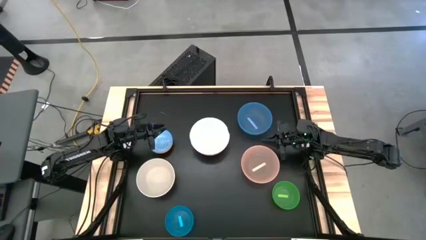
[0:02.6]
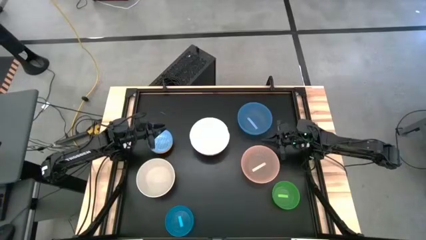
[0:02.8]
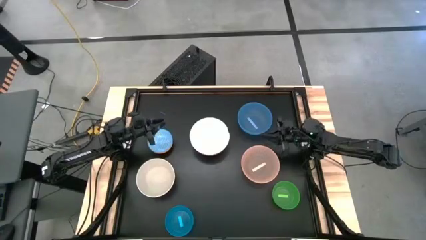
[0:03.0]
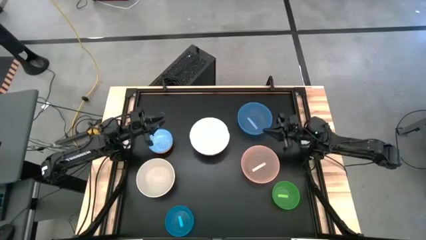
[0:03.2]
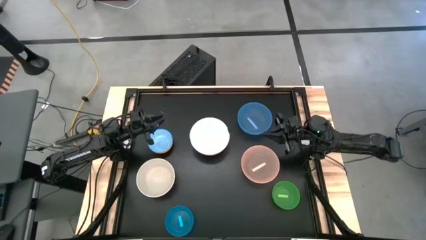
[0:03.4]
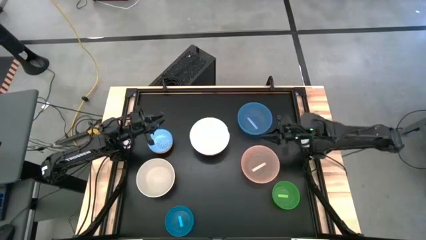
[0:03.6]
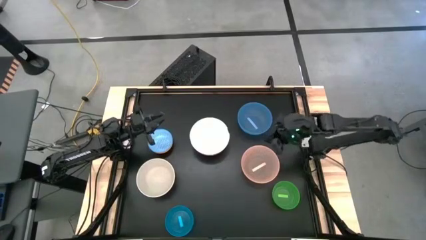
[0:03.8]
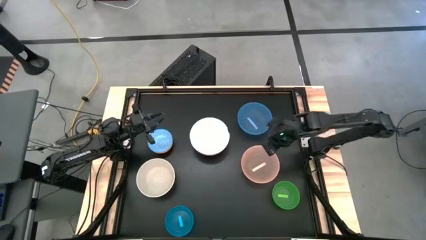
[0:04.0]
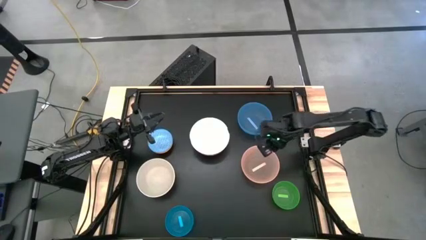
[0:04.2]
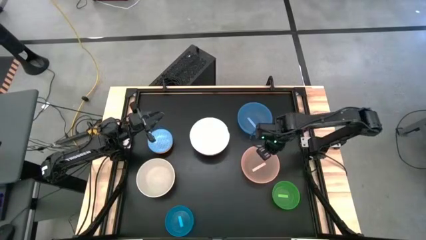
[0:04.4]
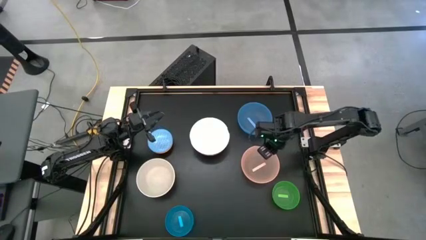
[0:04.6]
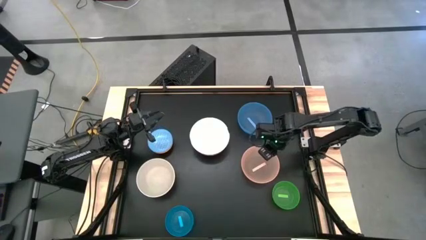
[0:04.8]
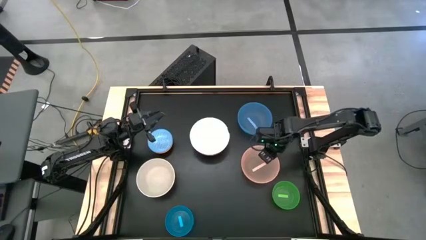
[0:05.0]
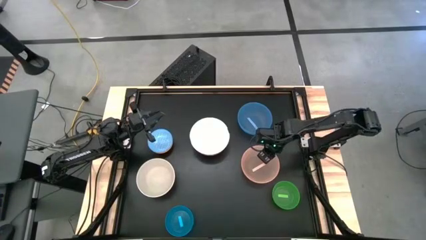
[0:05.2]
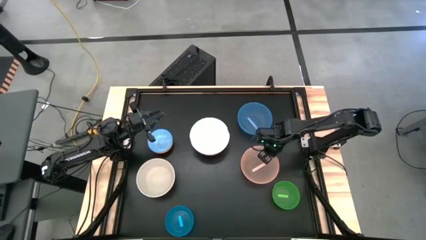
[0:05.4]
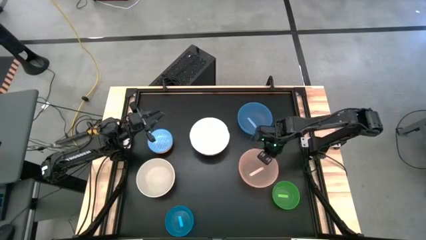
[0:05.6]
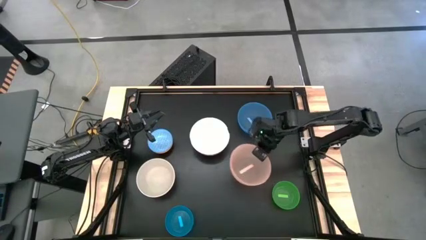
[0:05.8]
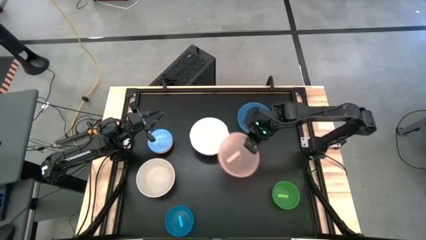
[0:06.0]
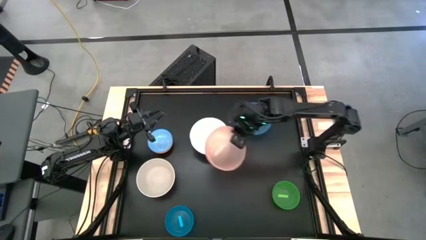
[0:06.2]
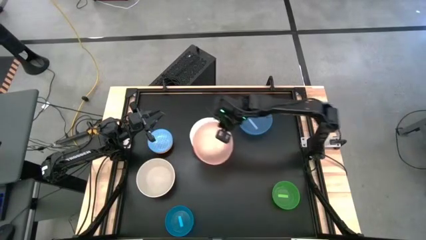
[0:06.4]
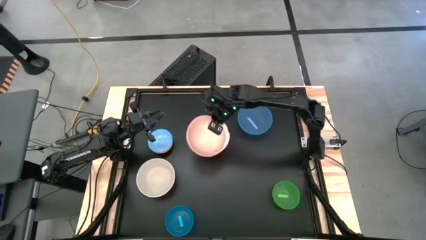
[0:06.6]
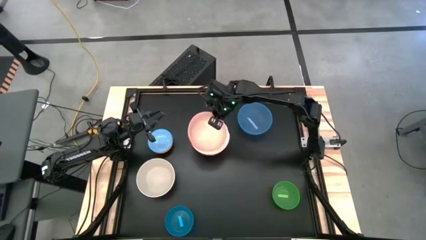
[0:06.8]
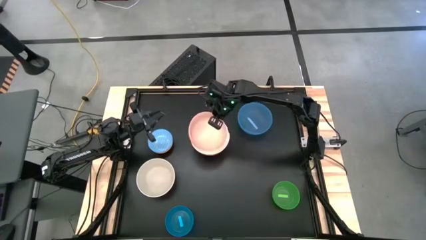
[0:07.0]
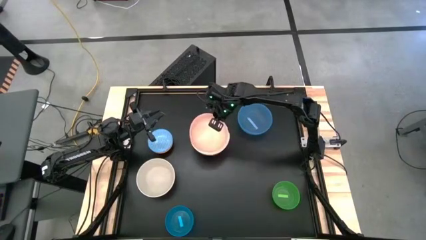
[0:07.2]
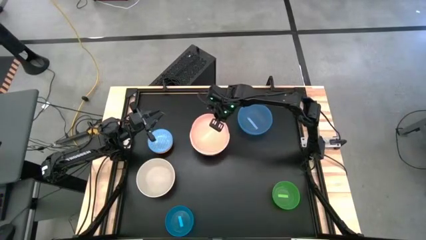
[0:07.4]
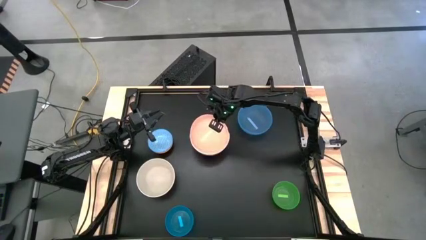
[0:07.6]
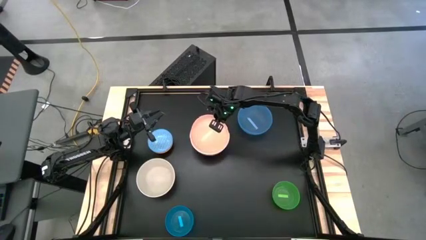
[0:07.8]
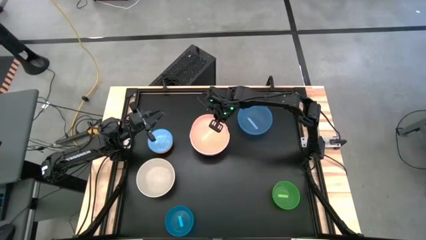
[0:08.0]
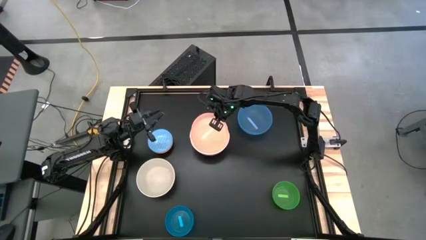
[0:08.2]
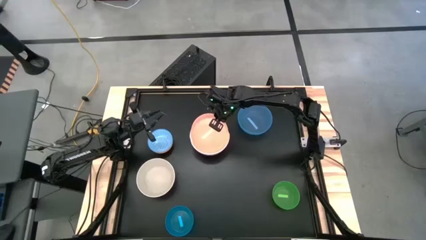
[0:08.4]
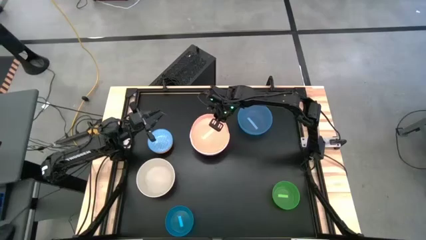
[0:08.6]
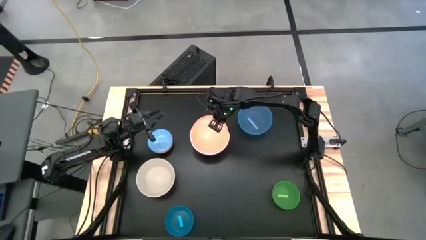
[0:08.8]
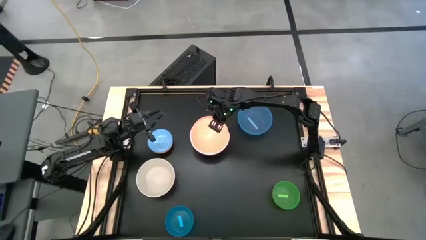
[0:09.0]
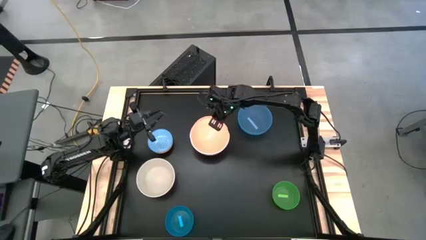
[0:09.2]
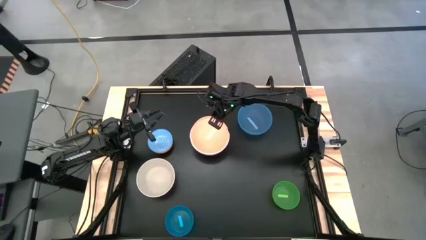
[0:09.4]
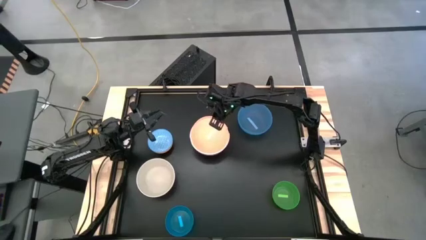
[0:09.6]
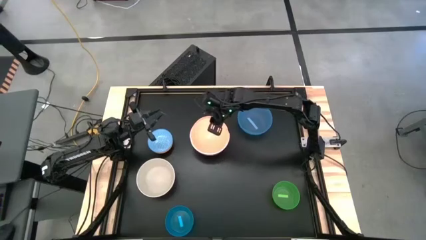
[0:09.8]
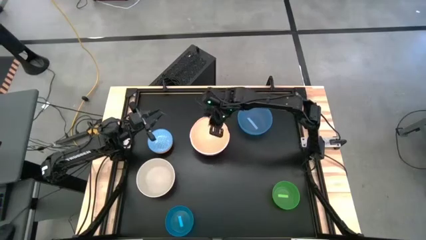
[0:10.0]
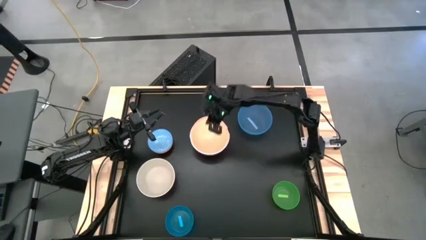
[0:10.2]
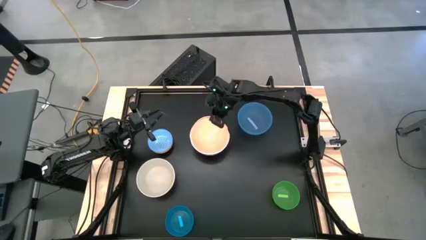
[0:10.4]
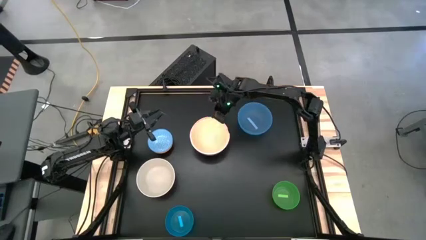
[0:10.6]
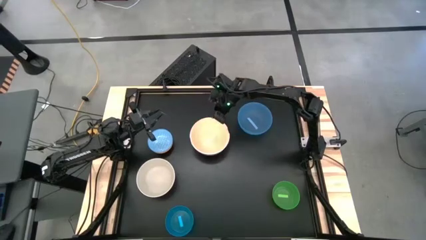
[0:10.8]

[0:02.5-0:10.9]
Stack the light orange transparent bowl on top of the white bowl

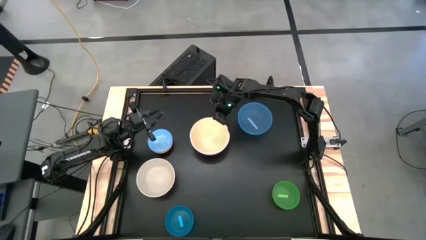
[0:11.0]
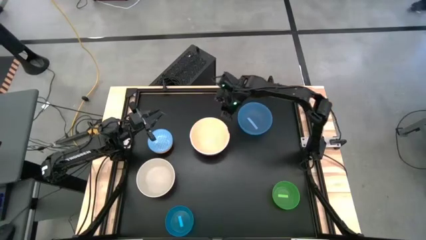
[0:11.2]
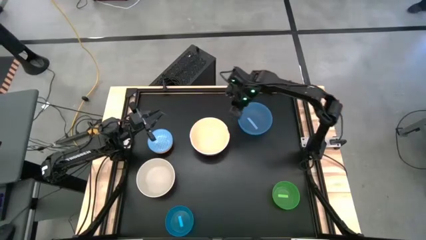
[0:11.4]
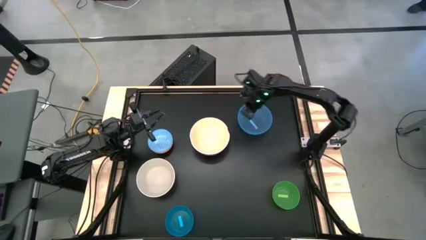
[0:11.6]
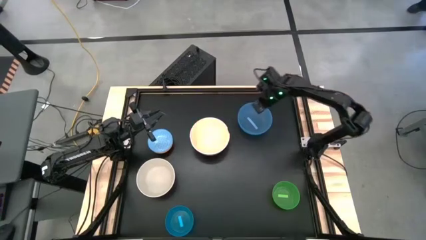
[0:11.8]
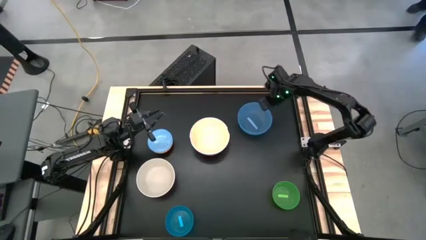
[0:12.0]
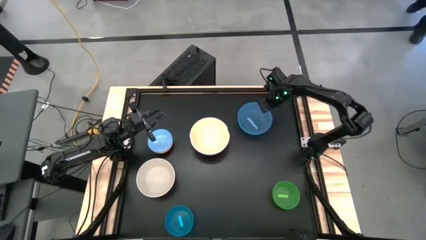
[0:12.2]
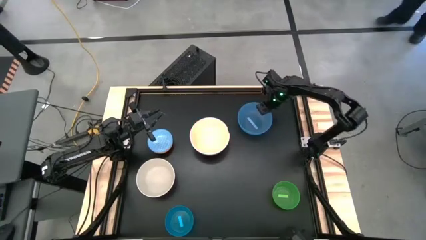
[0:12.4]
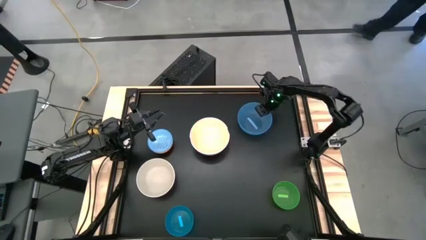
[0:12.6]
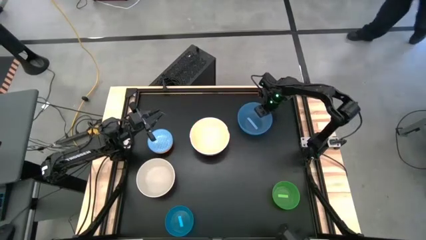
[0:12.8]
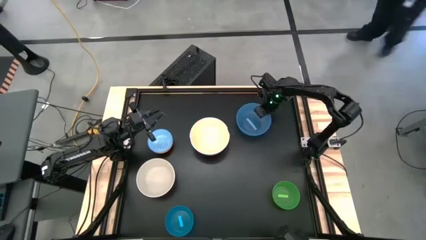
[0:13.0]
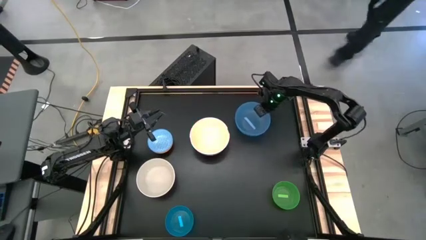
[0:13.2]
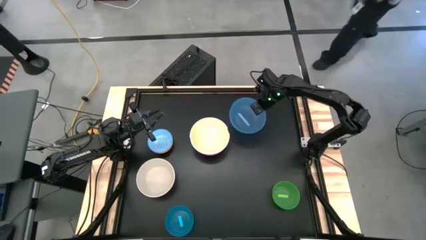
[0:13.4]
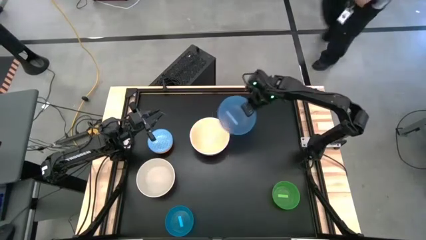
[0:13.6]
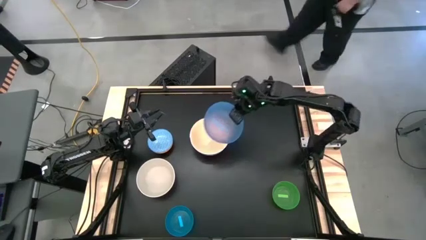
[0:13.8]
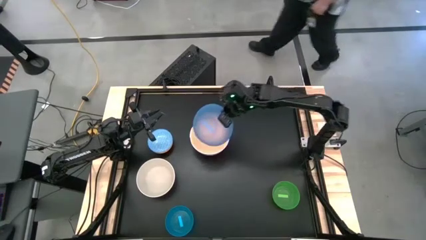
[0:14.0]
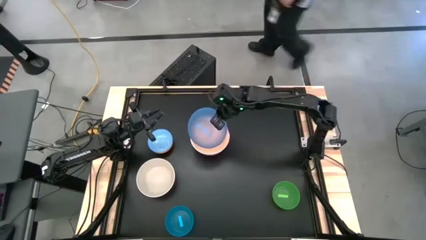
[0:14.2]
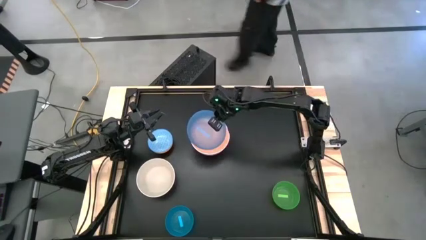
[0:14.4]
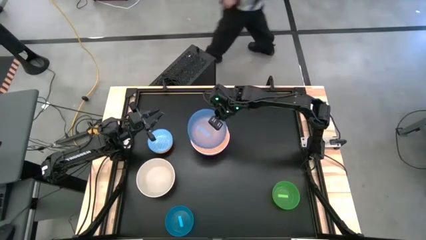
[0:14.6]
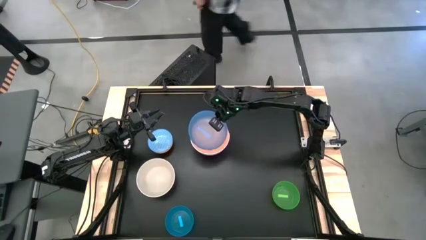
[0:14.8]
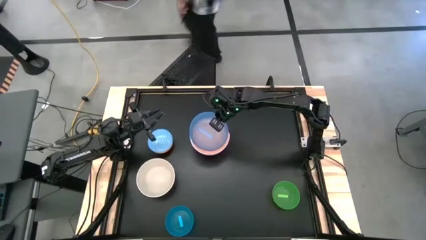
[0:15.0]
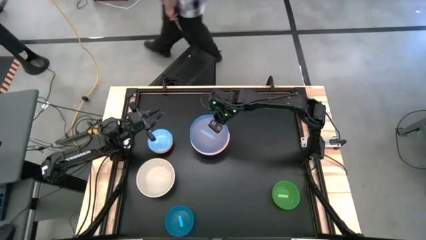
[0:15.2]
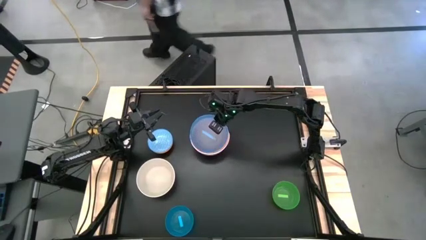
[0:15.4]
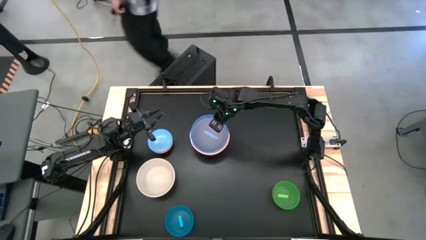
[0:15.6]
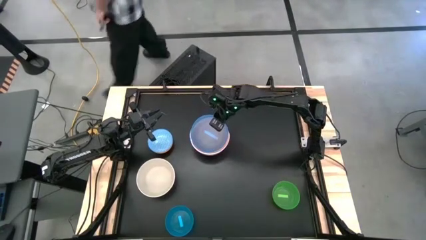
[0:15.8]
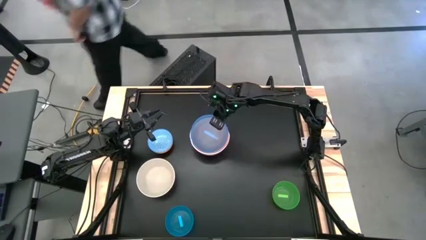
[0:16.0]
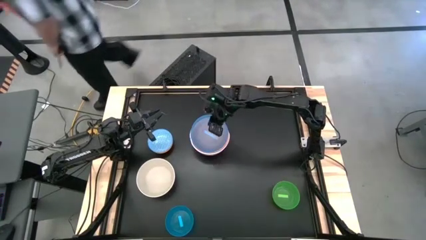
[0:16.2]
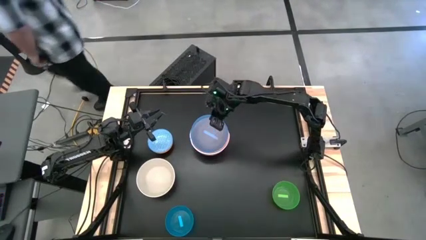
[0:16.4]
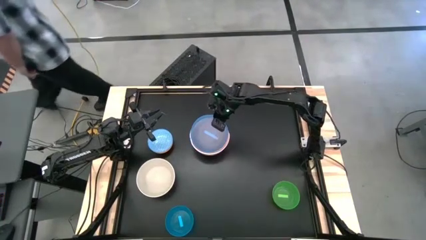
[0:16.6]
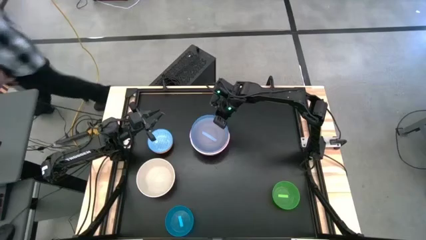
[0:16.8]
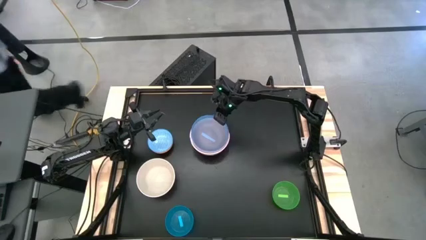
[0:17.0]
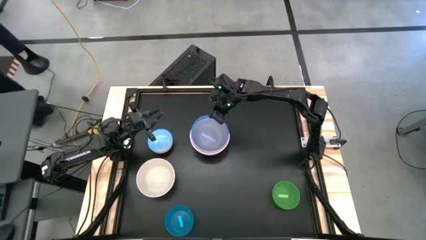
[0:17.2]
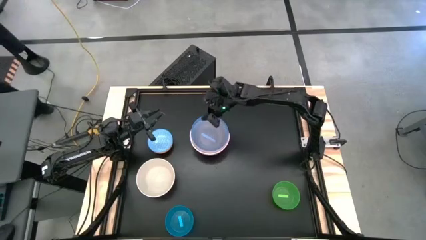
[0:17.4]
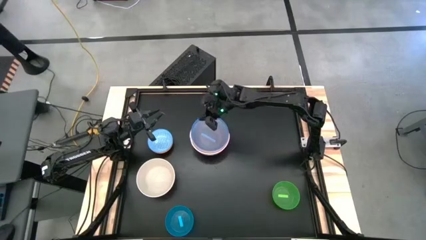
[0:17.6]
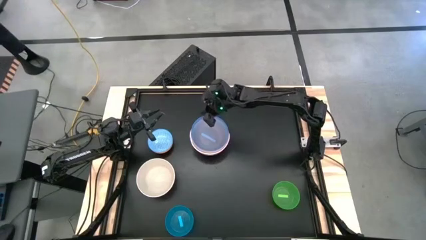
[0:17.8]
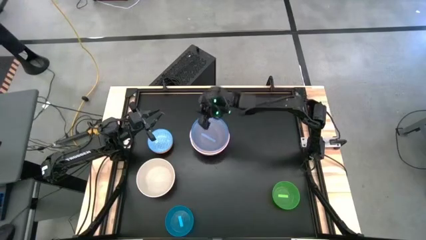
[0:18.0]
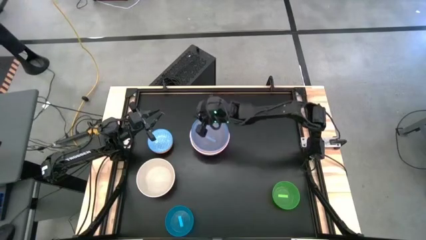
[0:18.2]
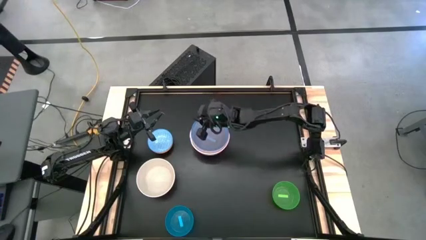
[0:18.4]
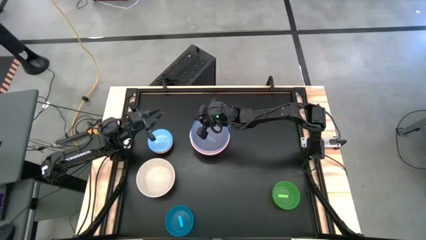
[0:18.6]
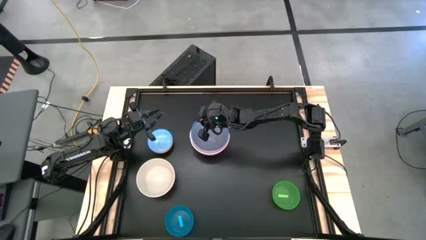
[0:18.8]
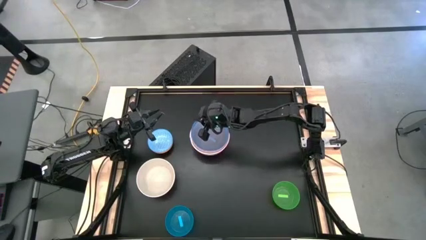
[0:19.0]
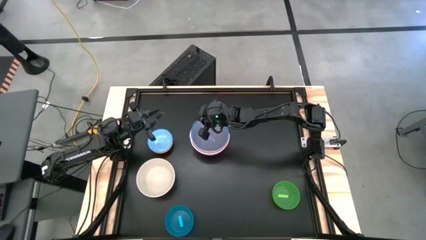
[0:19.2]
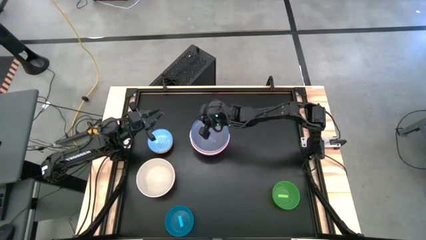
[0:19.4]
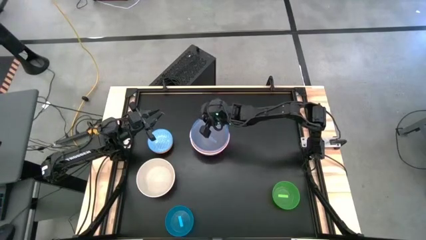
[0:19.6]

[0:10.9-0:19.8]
Stack the blue transparent bowl on top of the light orange transparent bowl
